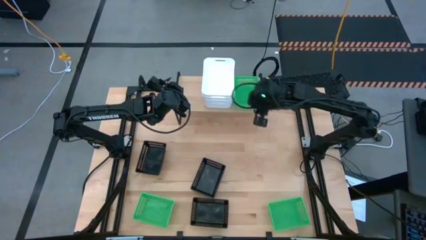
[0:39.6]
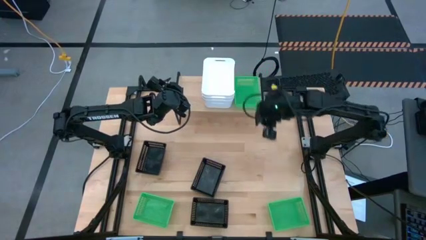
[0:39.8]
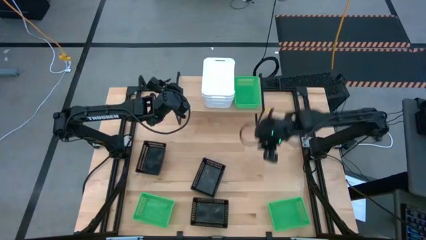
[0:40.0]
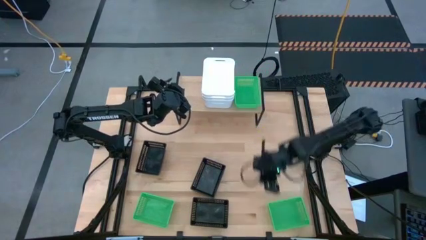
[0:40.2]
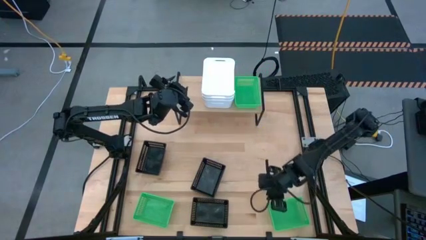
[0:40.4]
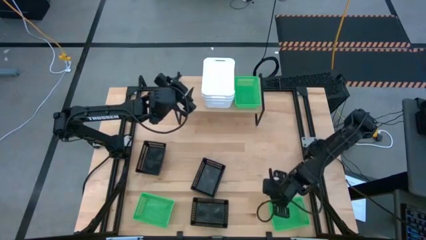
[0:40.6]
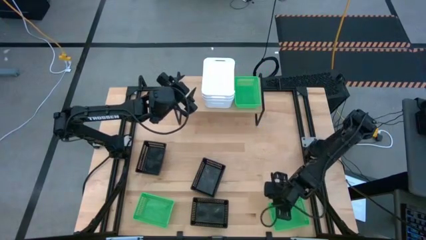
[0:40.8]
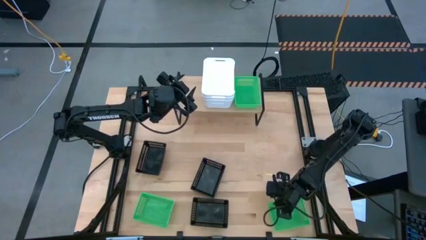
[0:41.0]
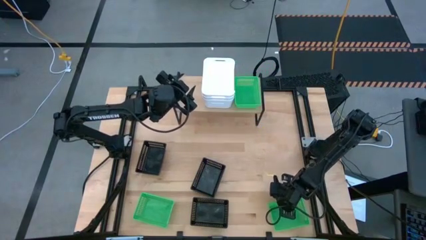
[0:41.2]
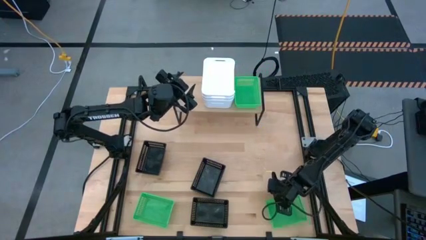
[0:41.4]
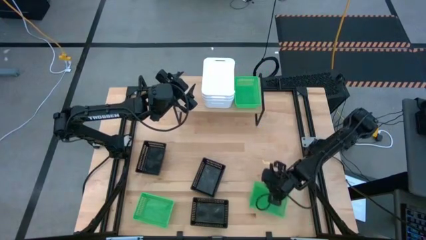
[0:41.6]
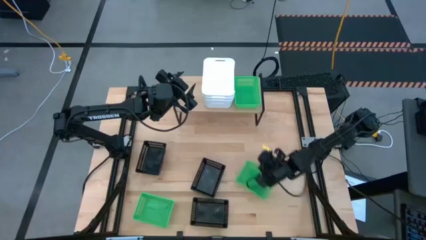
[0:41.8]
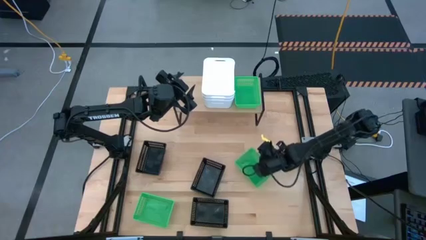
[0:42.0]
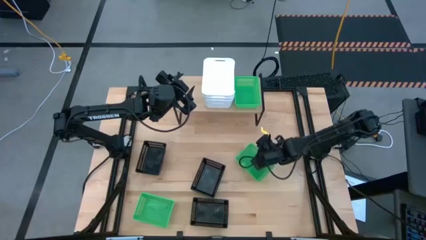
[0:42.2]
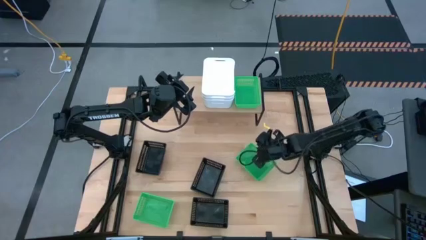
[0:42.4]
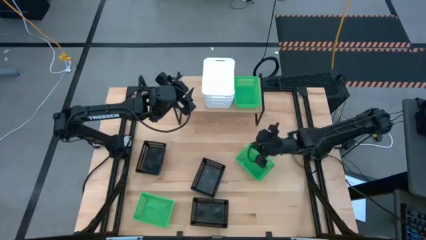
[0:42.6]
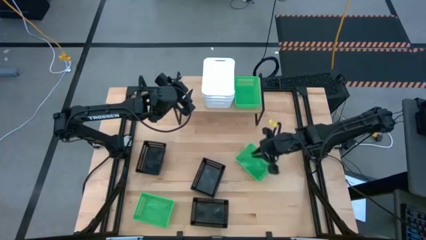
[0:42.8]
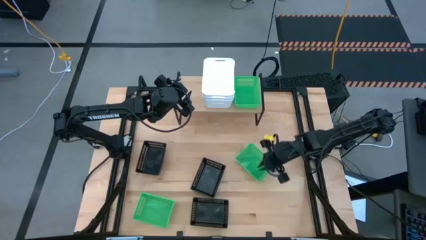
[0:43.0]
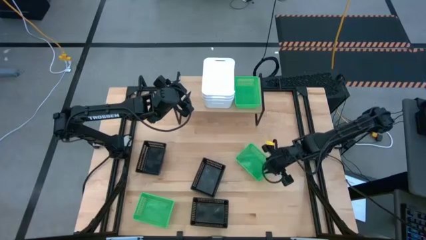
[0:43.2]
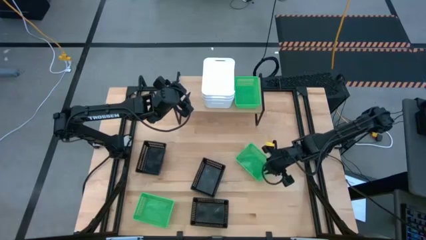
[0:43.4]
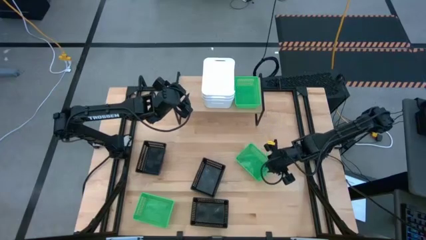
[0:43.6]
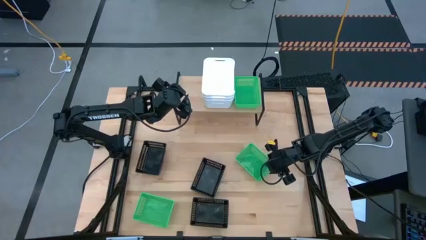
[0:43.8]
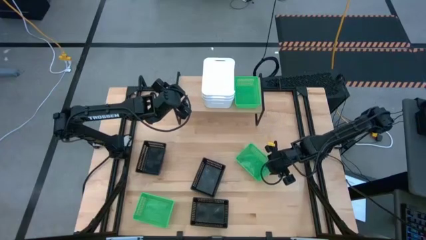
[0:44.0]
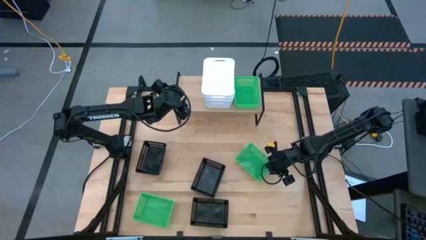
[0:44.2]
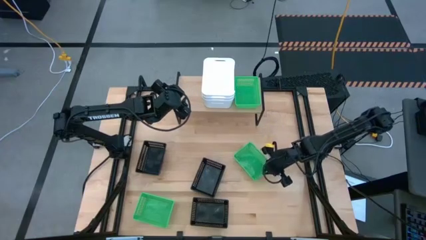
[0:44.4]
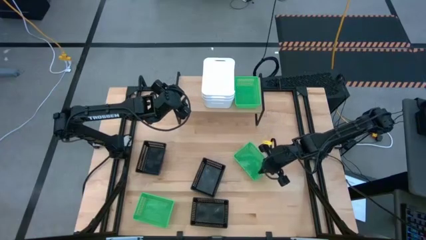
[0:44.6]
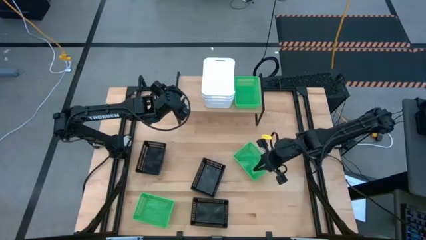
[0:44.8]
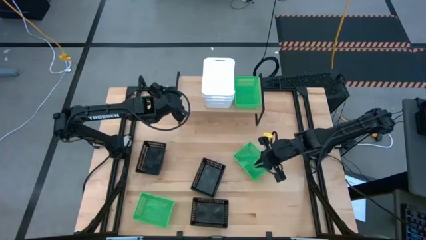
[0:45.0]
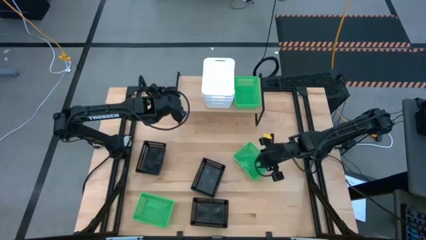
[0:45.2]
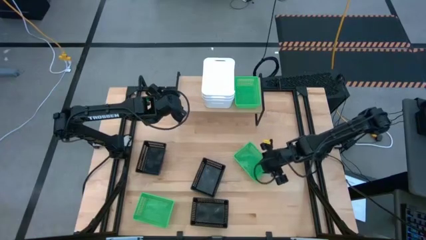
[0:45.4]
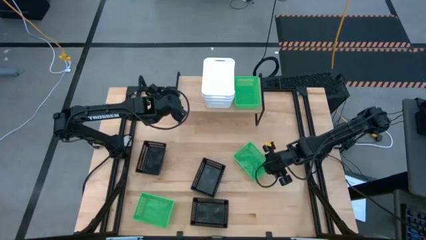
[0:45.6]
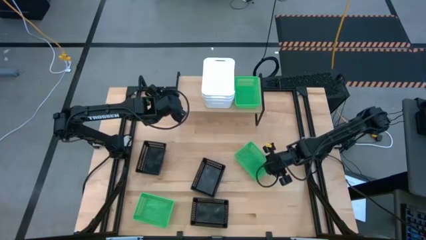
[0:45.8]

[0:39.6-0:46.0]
Task: Stack baskets on shelf by color
Stack the right green bin on top of the other green bin on the shelf

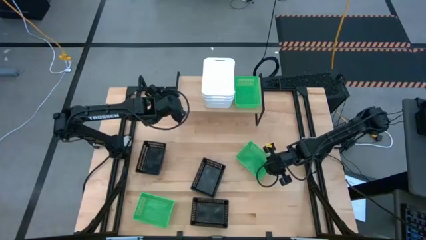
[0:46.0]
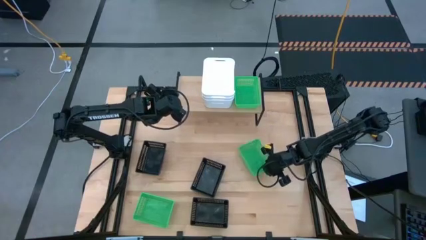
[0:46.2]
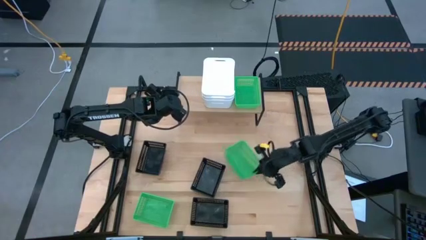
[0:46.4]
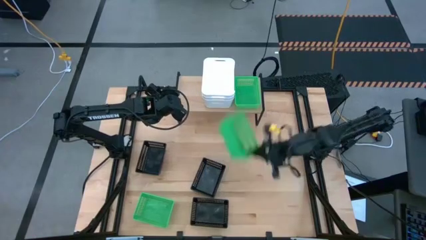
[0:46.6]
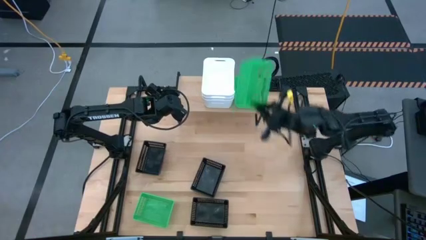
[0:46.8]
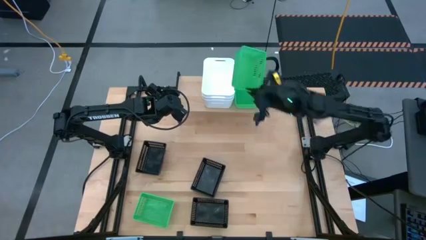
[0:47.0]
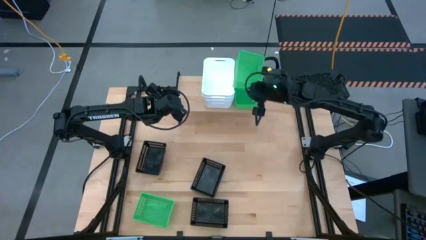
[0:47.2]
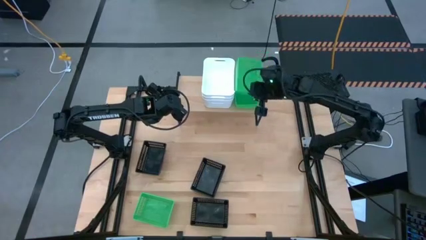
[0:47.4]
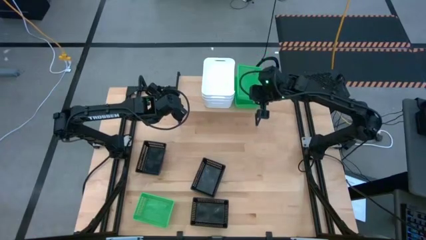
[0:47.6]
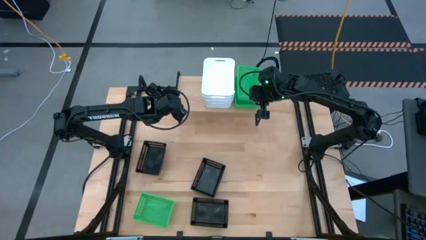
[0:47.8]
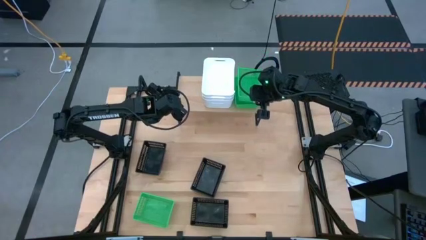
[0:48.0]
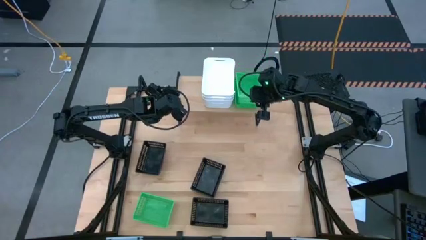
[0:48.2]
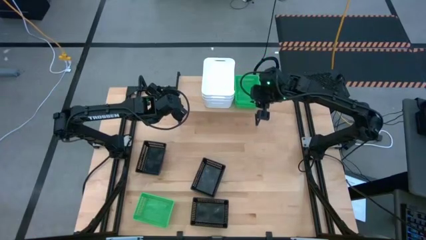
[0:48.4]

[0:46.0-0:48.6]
Stack the right green bin on top of the other green bin on the shelf

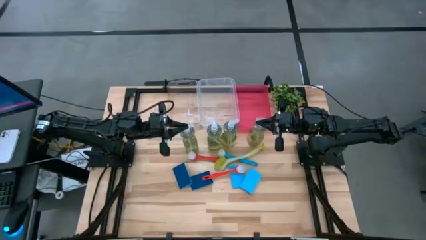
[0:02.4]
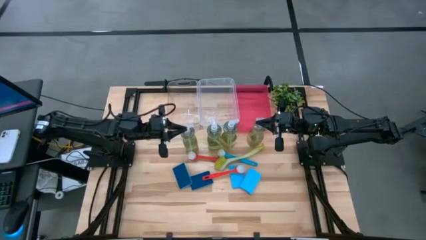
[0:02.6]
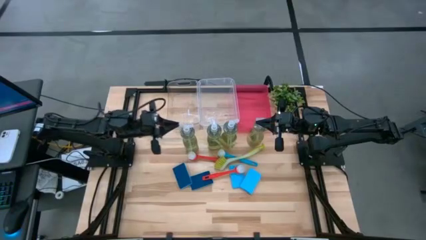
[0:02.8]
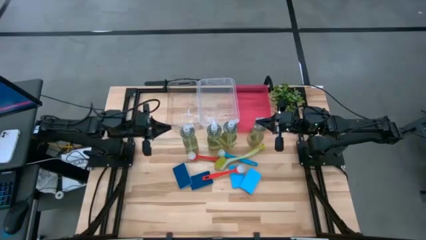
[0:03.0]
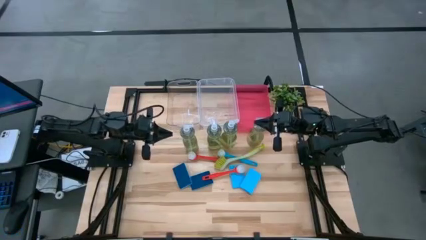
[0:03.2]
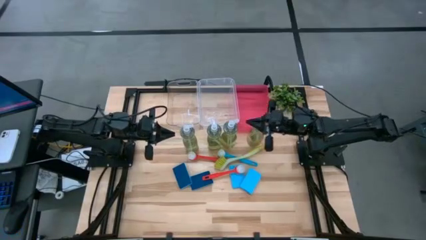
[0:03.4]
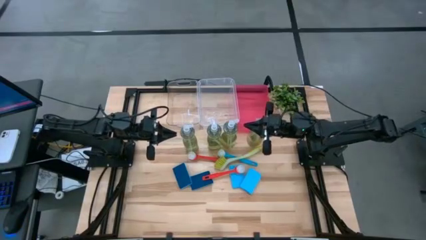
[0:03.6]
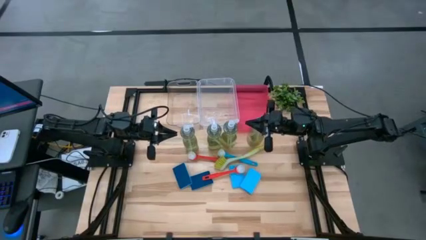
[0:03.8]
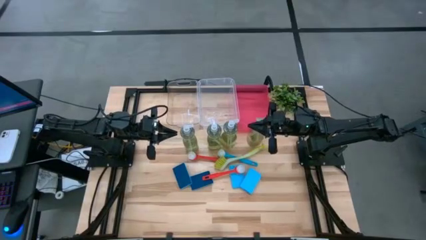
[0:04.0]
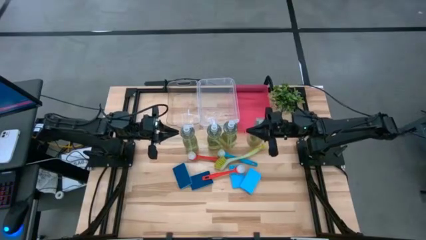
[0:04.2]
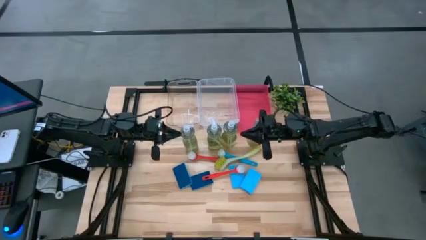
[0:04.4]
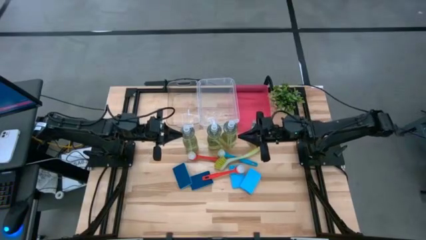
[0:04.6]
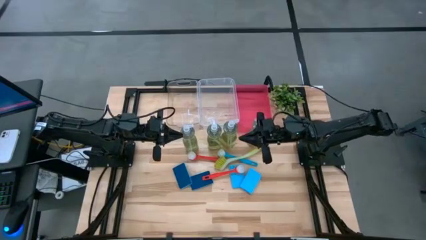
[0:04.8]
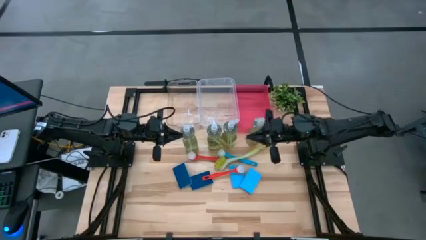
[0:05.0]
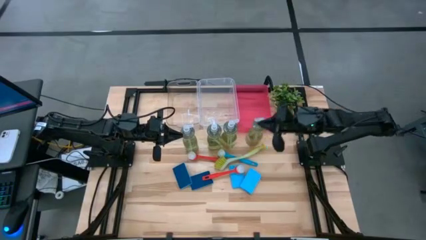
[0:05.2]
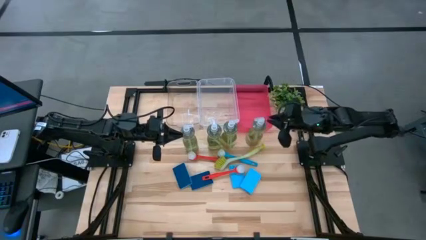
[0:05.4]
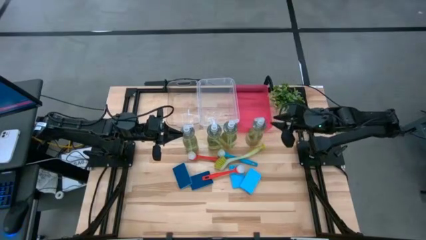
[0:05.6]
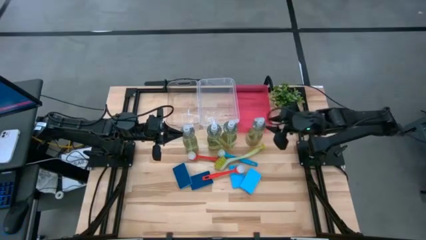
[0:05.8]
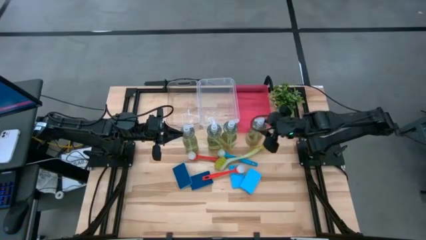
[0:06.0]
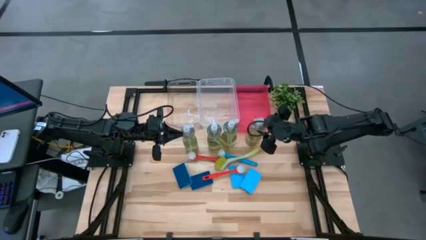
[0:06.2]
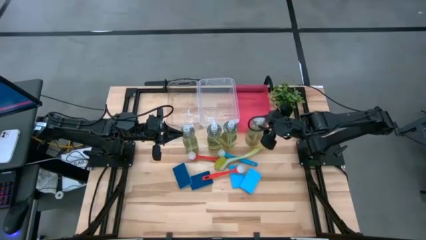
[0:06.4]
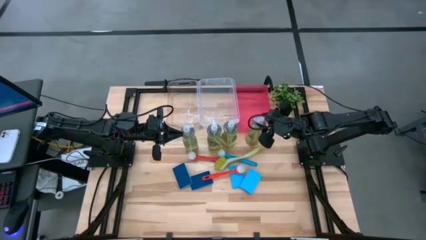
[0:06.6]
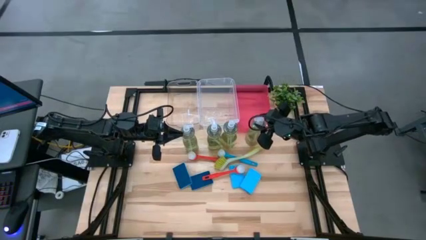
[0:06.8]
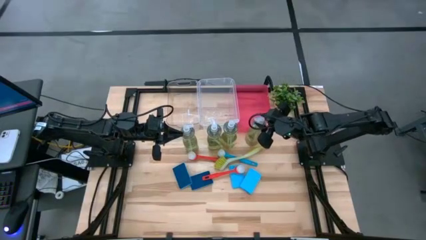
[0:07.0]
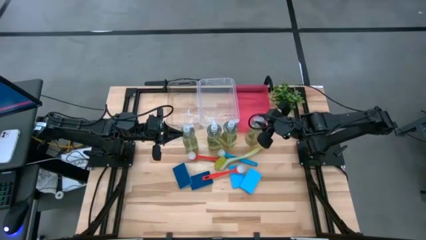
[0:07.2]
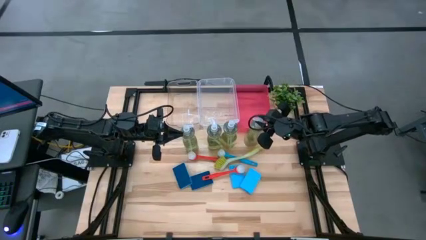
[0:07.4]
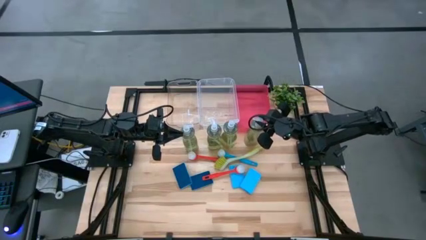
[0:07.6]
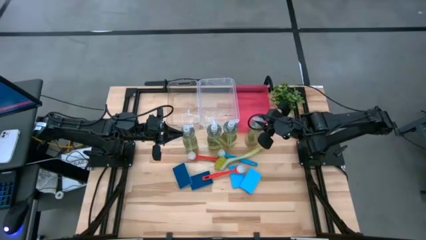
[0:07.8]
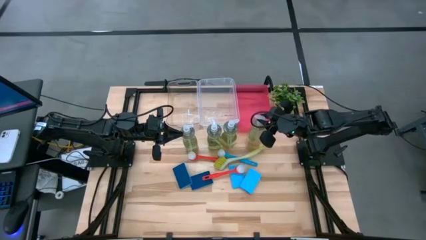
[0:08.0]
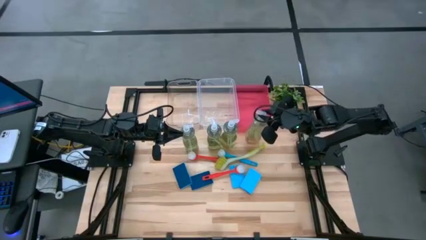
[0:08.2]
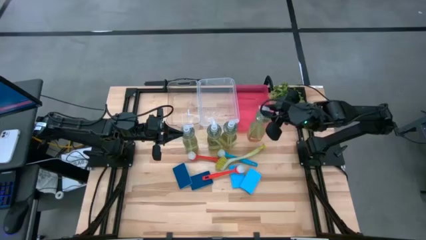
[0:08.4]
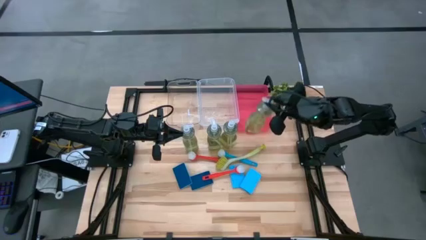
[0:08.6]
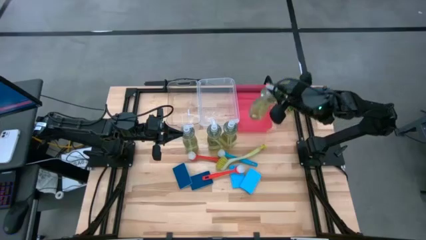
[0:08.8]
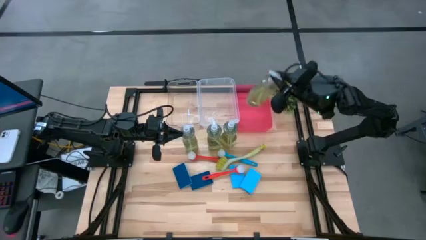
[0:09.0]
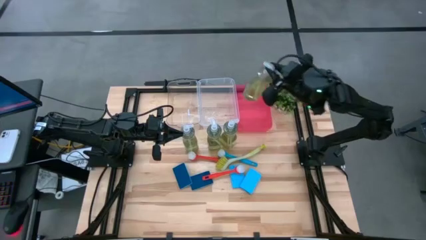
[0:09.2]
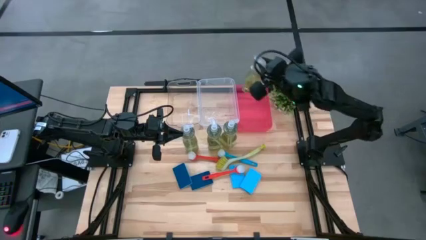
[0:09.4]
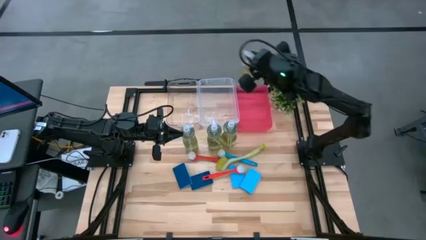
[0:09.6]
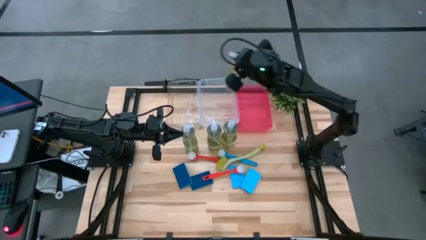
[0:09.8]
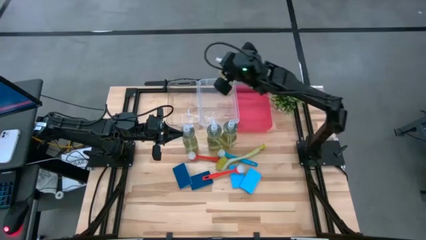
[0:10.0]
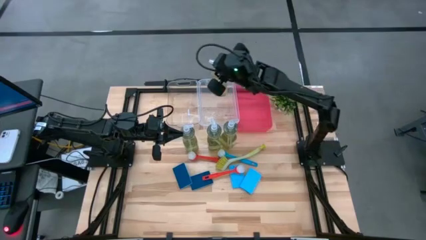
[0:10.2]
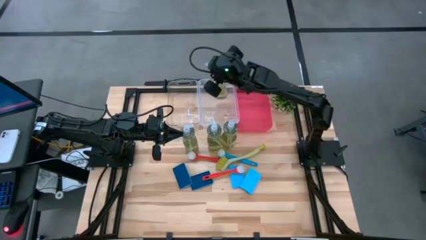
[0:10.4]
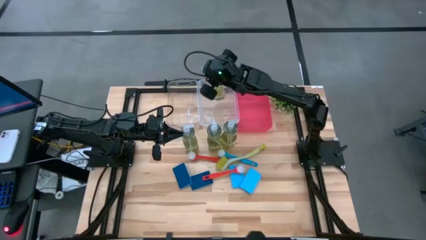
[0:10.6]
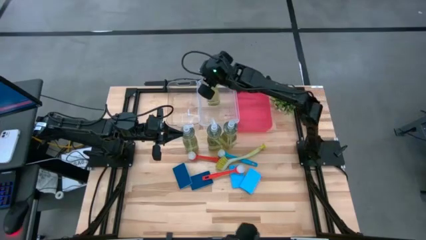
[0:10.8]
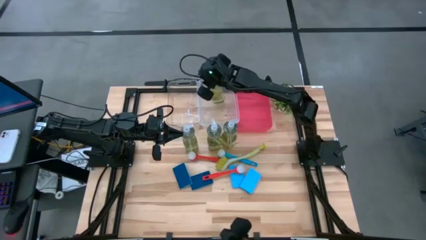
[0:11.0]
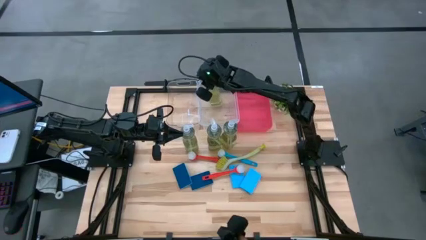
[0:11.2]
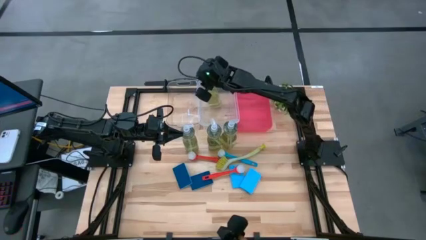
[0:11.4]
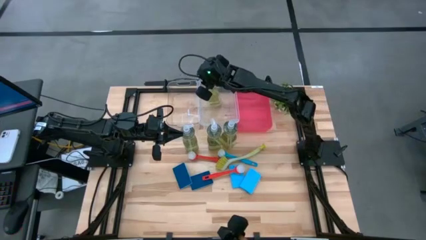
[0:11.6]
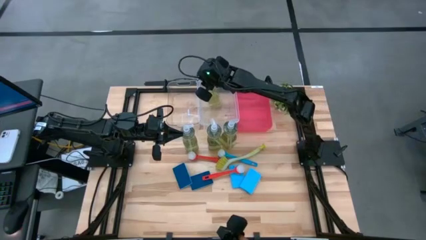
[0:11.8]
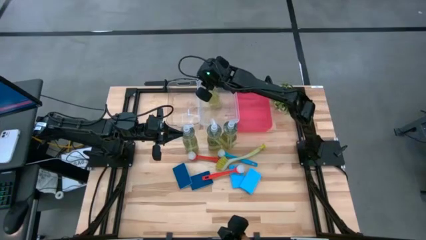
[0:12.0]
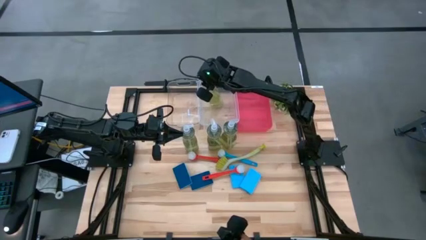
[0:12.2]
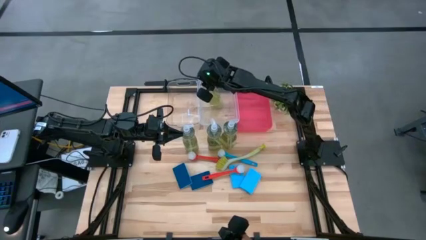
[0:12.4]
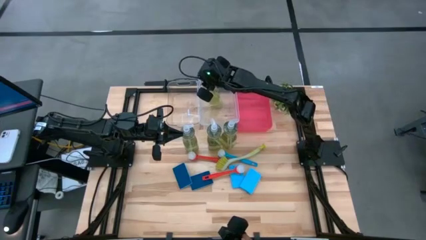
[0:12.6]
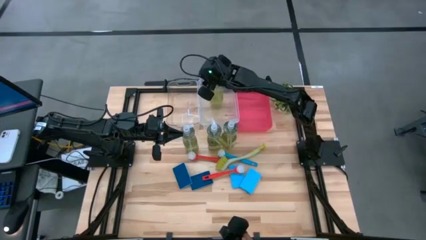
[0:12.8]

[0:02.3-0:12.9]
Task: Pick & Place Kitchen Sink Supplies
Put the yellow soap dispenser into the right transparent bin
